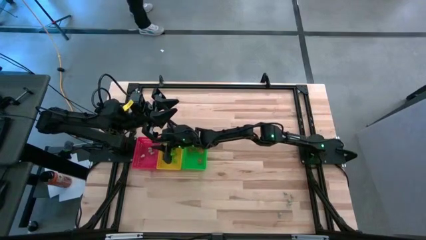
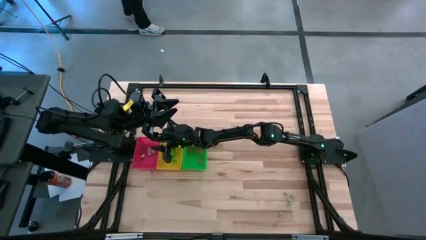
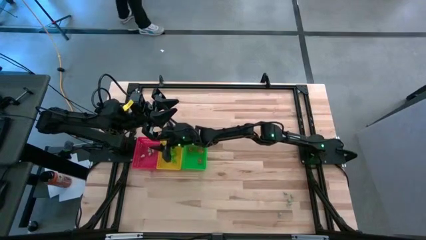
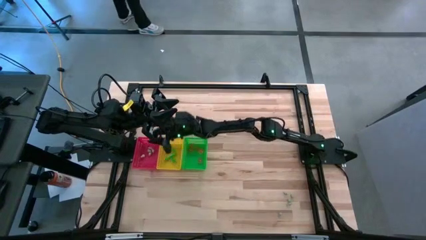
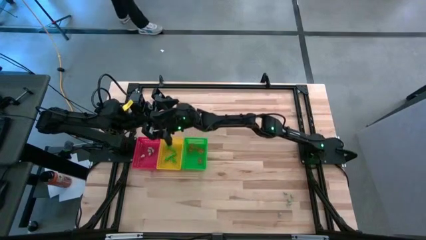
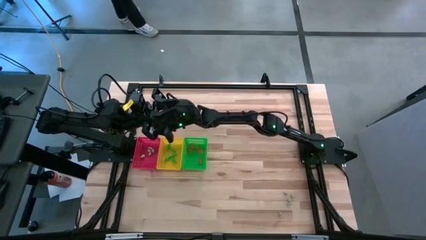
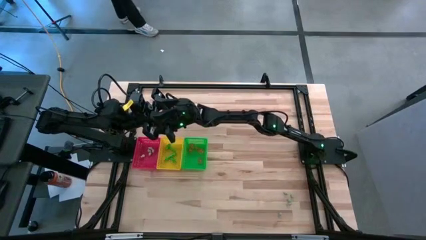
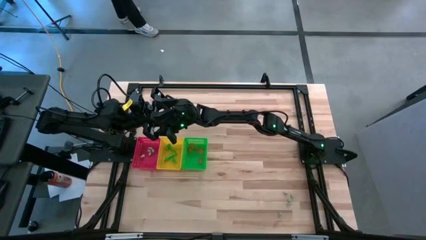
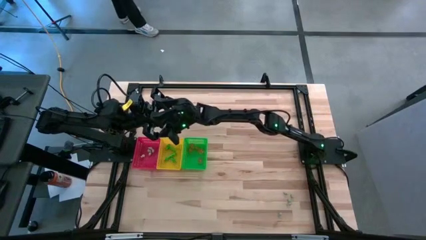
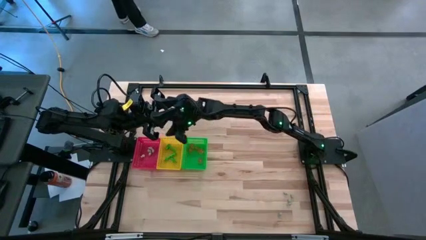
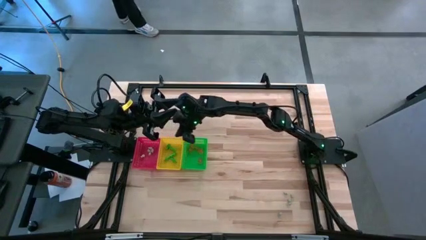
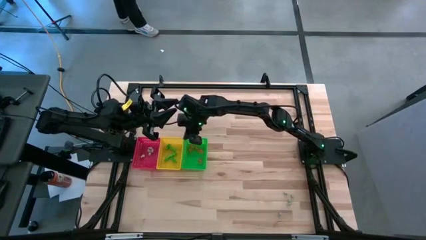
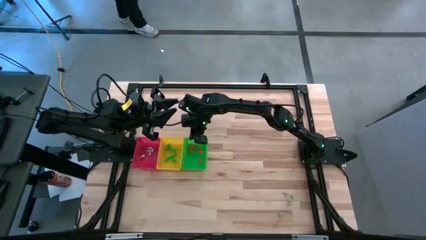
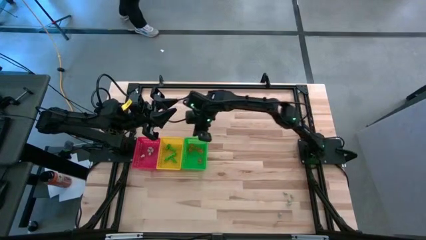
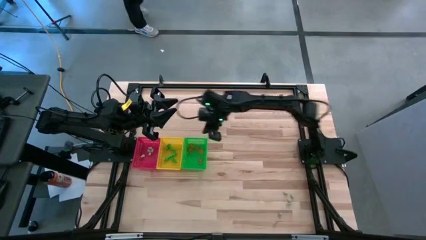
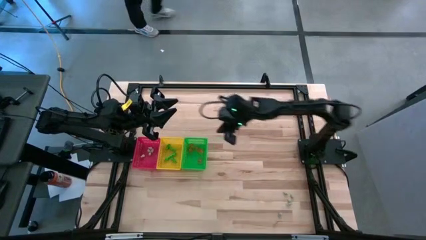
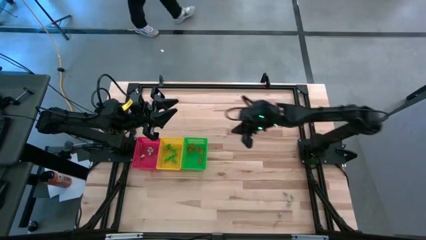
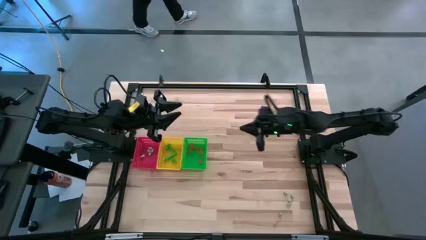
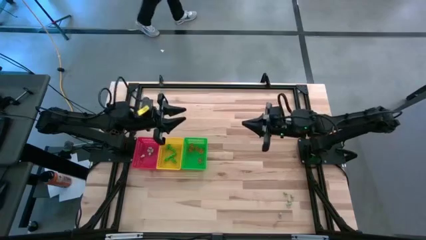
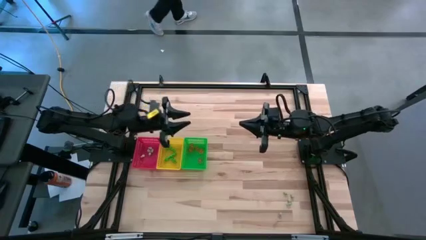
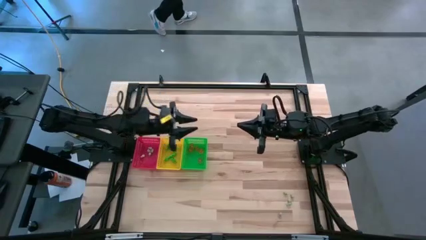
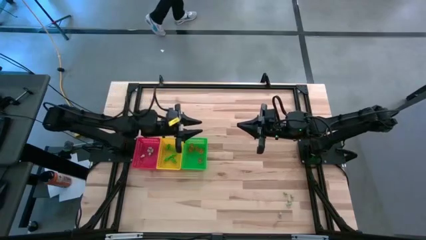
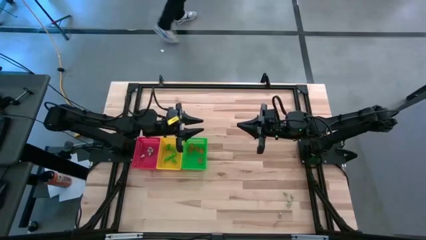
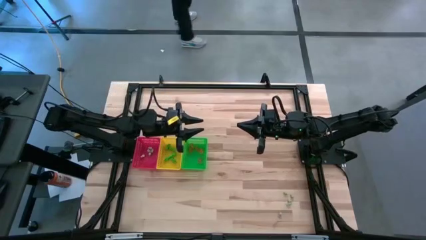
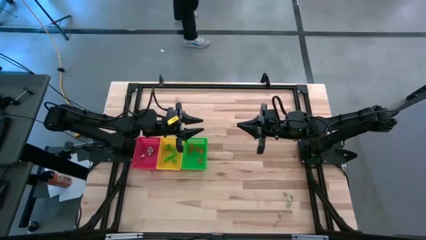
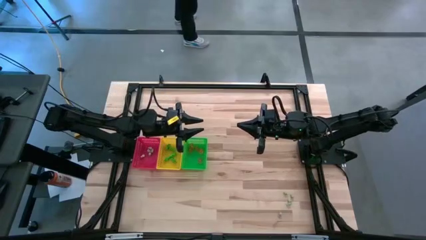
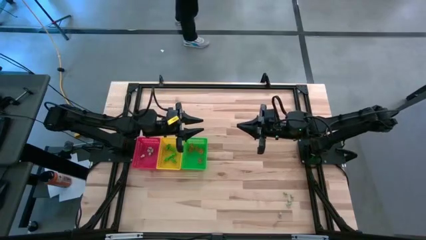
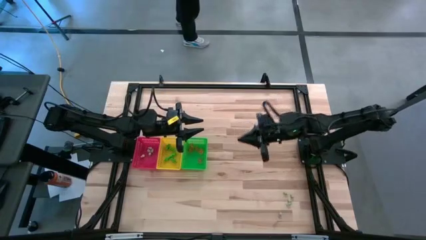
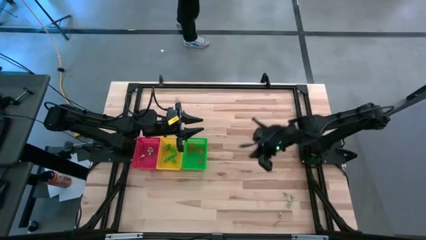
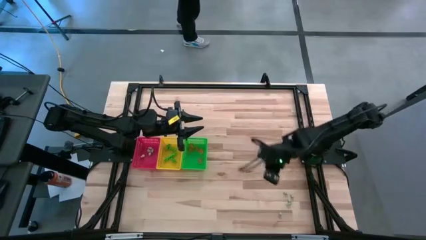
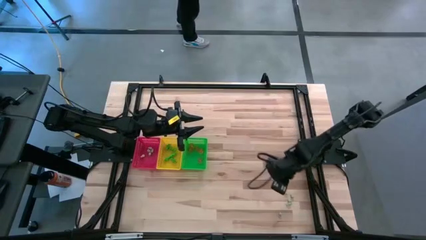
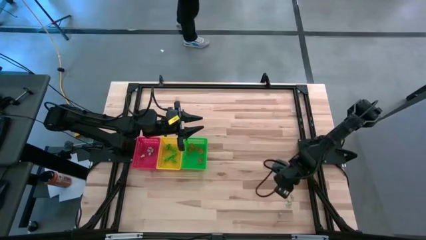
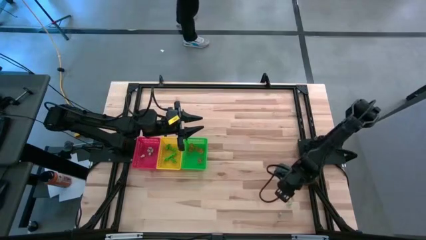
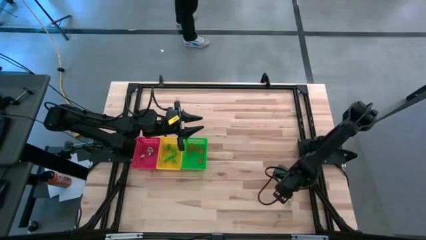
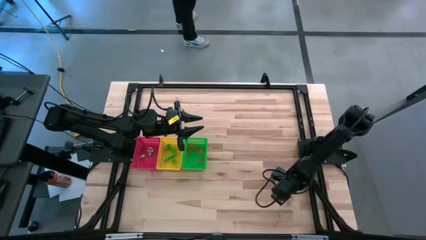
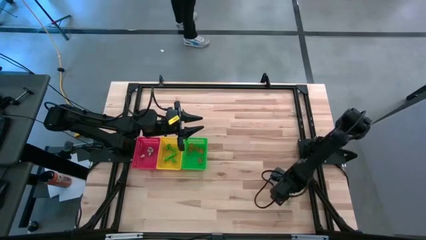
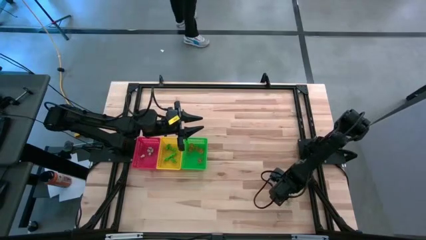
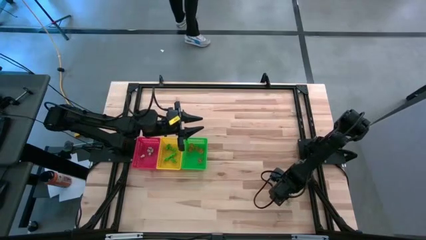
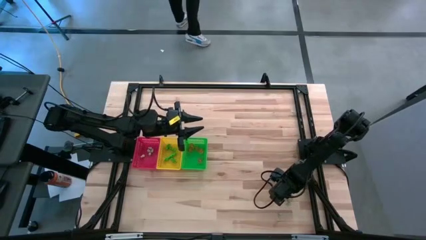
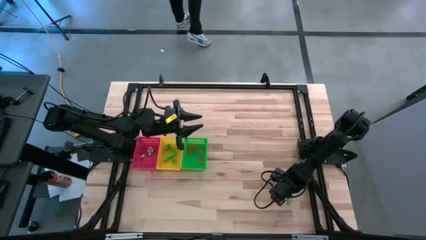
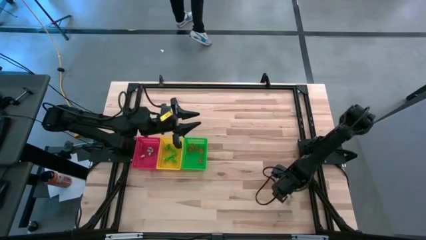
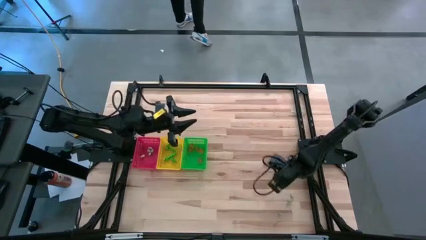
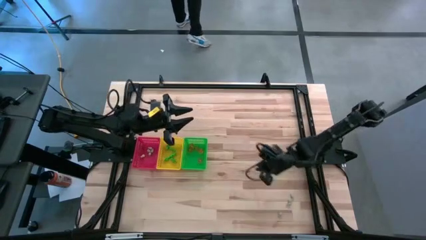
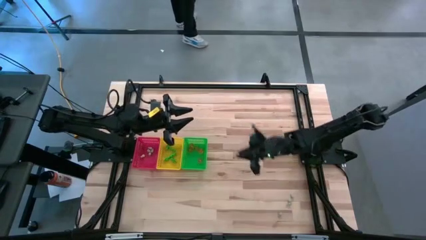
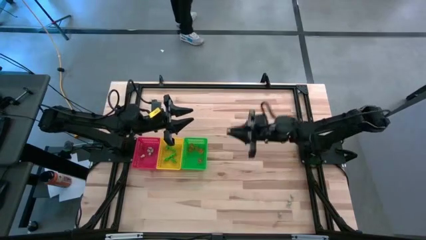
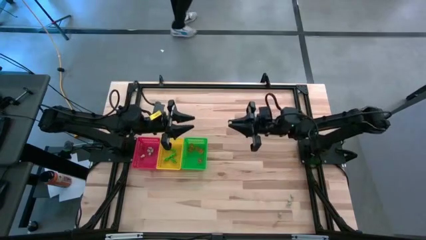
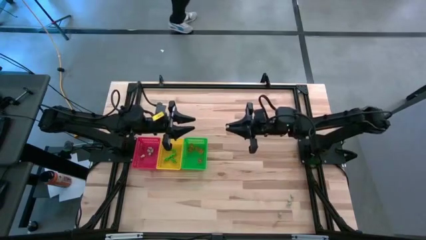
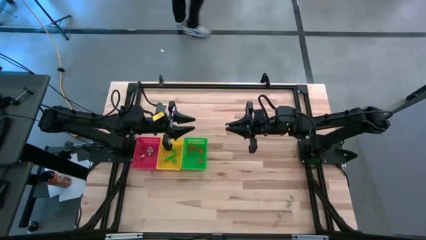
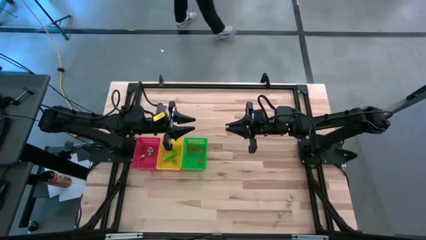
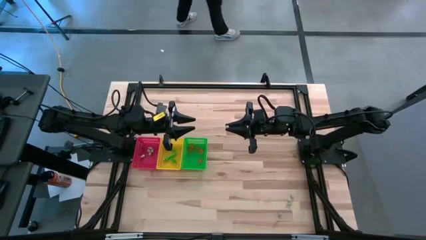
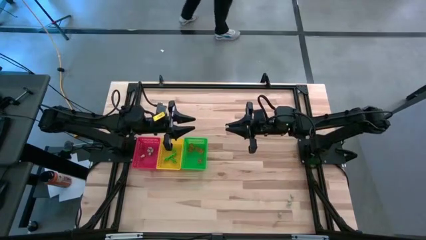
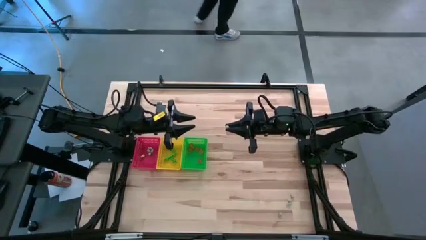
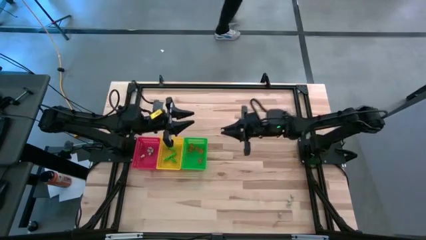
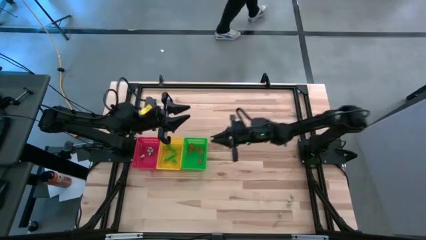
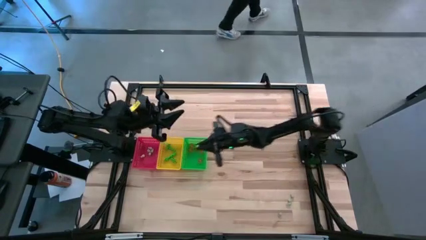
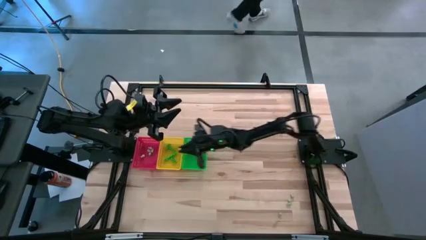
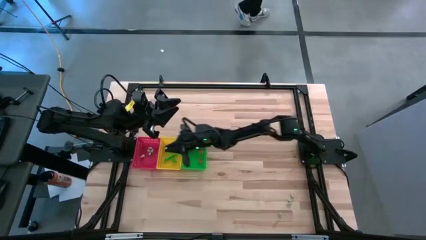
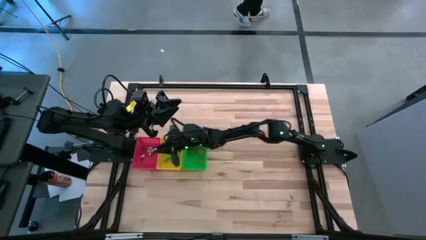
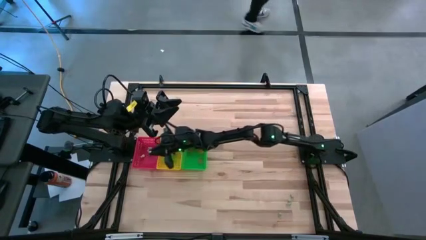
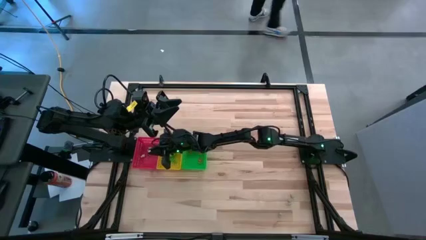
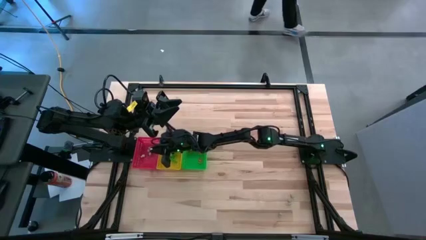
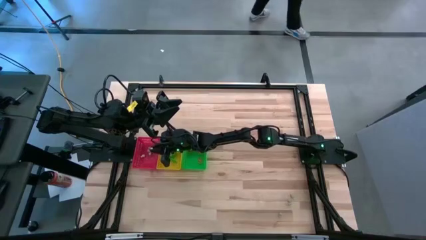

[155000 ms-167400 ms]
Task: Sort Halloween decoration
Put the white skull toy into the red bin

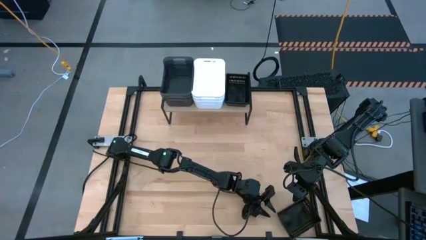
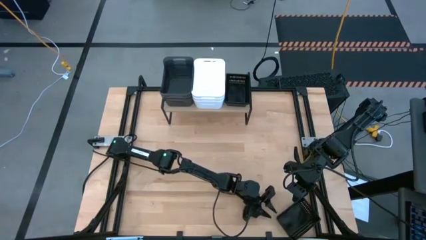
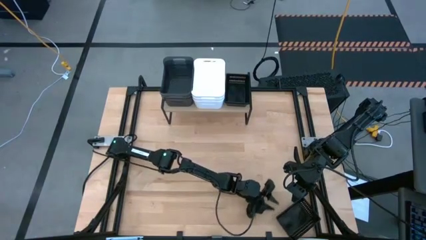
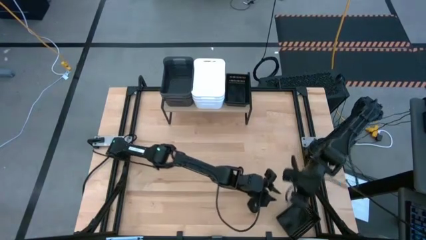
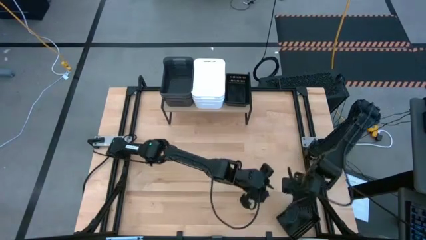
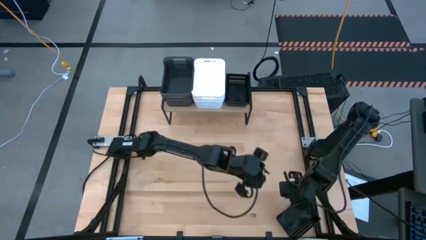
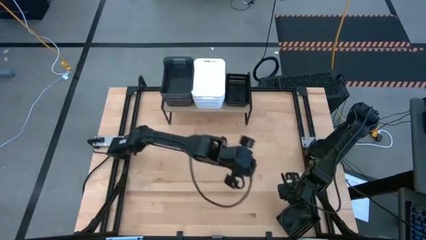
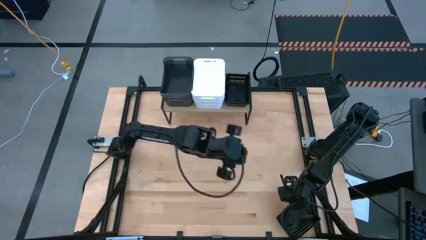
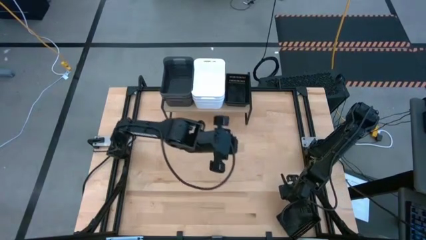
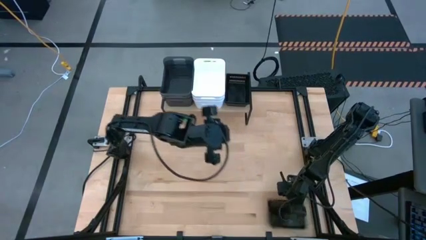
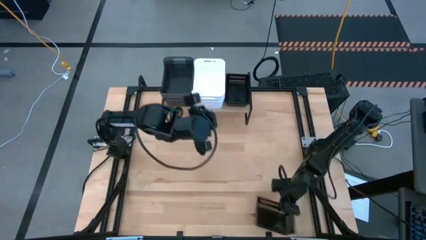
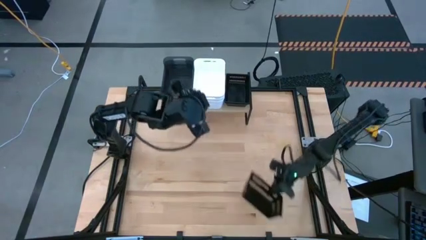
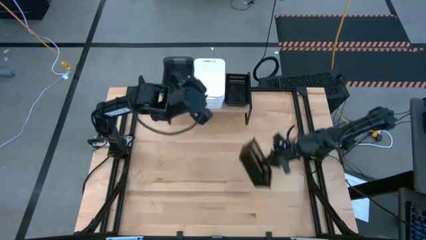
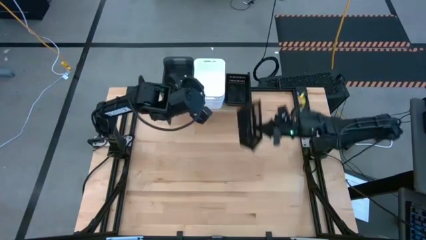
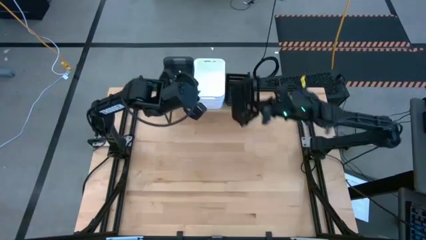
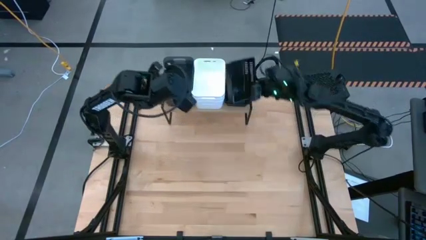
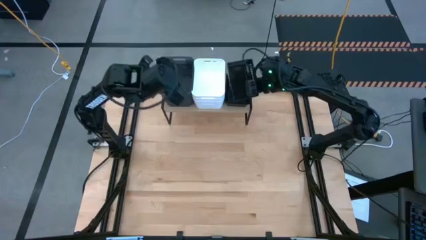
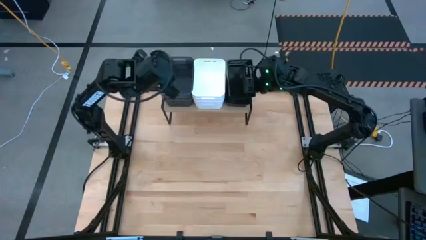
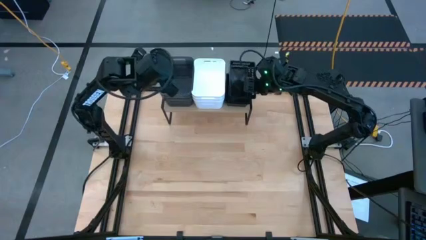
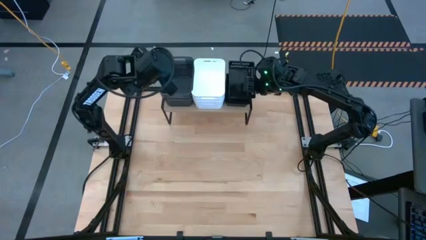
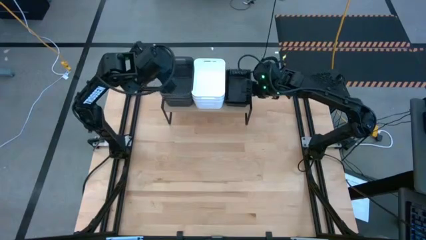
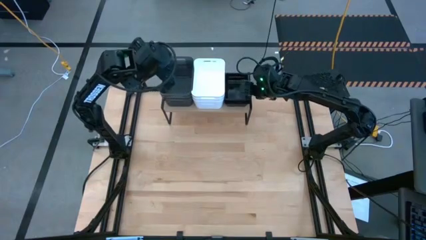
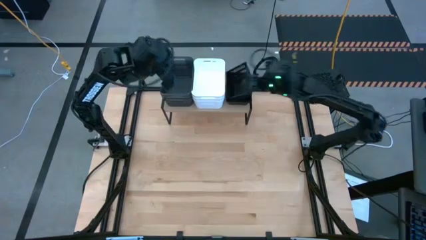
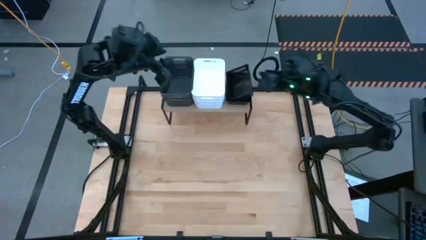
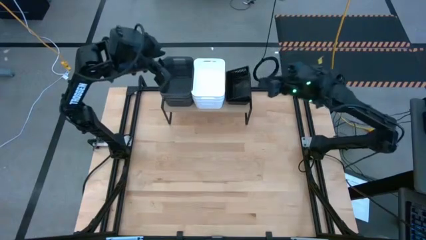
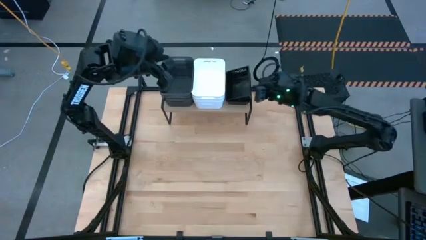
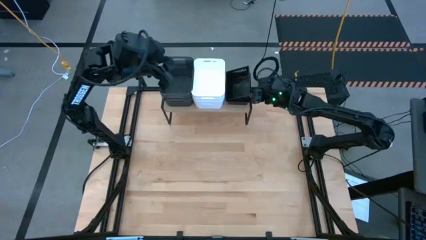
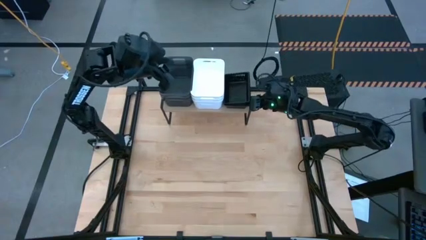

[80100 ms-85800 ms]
Task: Stack baskets on shelf by color
Stack the black bin on top of the black bin on the shelf
